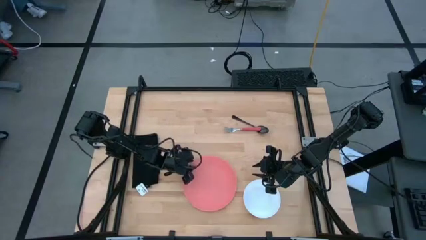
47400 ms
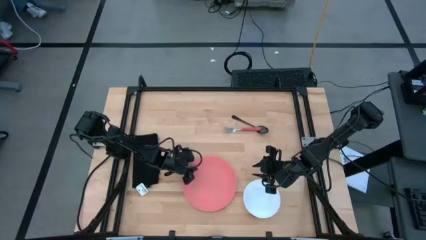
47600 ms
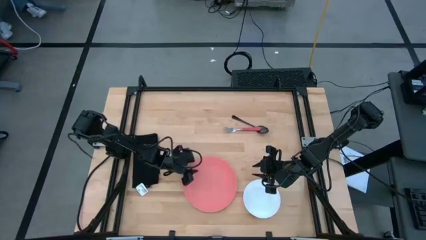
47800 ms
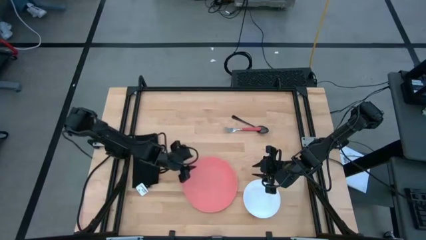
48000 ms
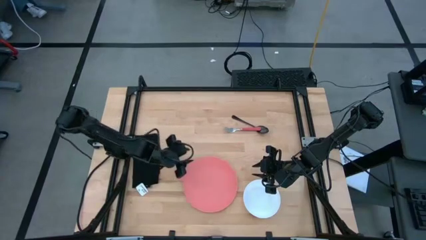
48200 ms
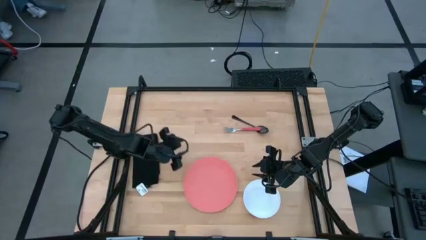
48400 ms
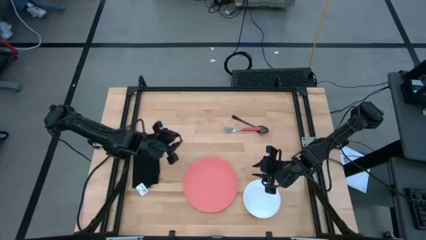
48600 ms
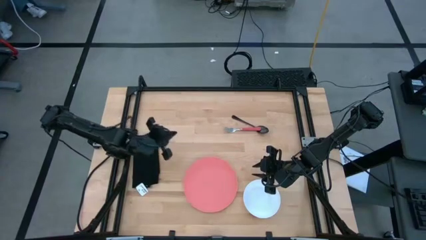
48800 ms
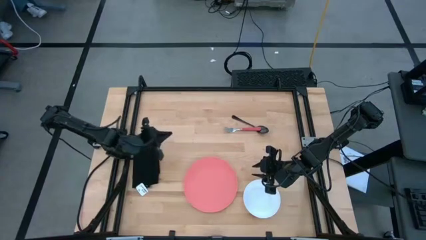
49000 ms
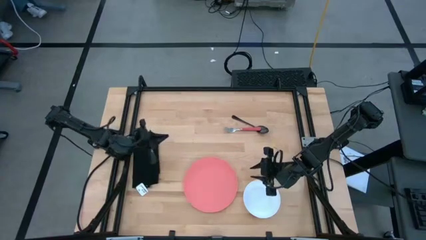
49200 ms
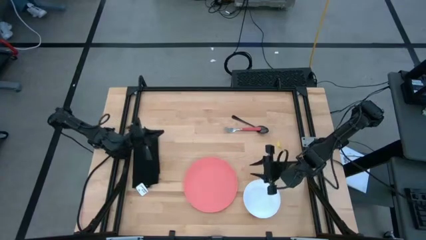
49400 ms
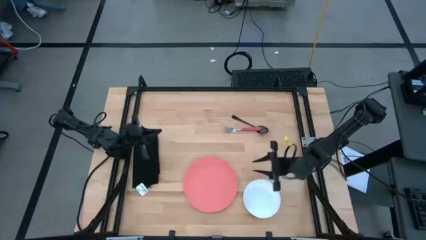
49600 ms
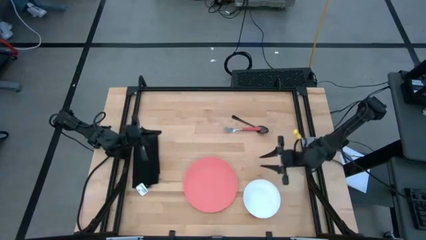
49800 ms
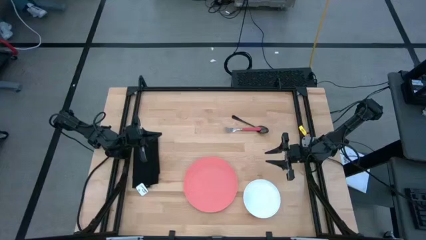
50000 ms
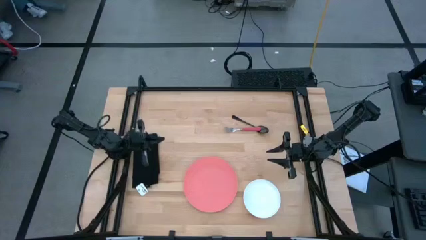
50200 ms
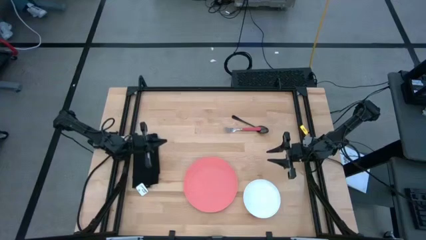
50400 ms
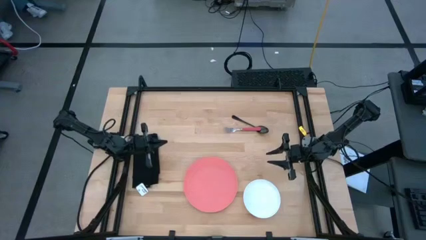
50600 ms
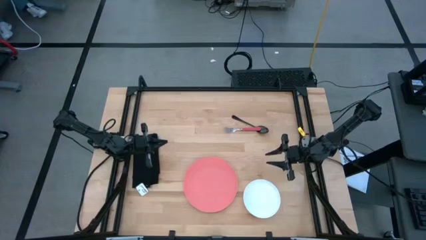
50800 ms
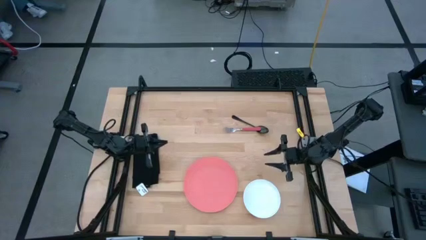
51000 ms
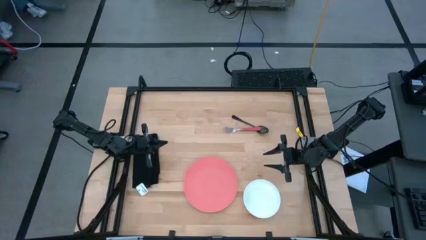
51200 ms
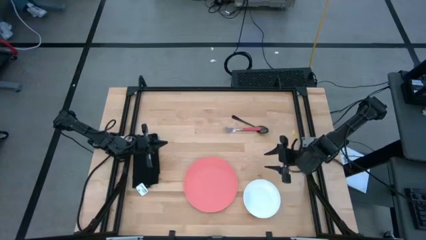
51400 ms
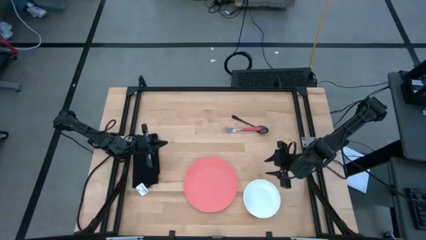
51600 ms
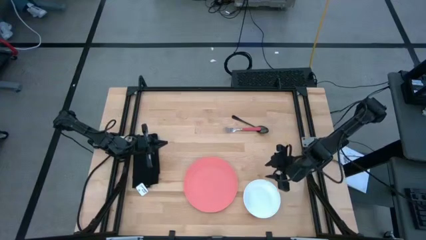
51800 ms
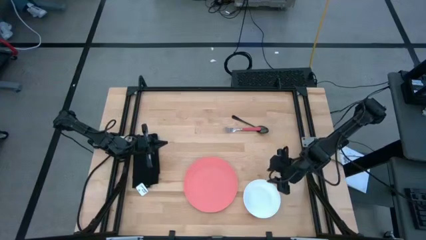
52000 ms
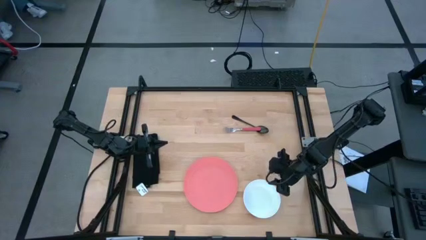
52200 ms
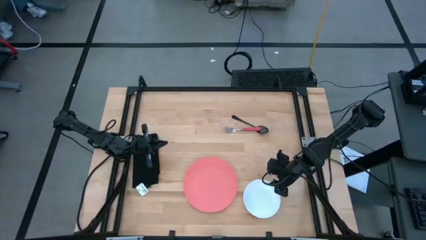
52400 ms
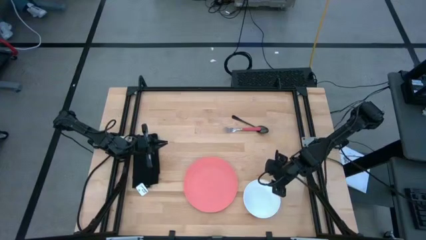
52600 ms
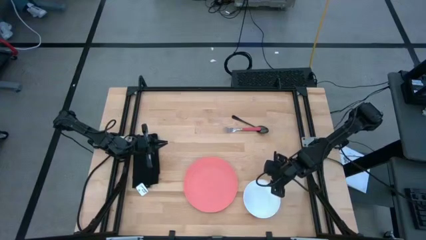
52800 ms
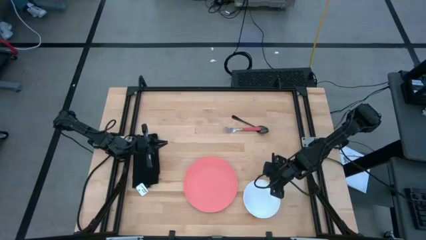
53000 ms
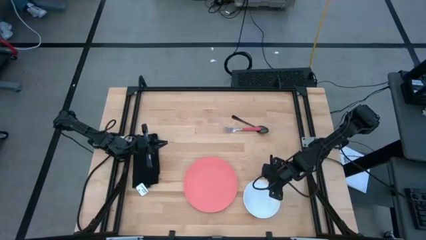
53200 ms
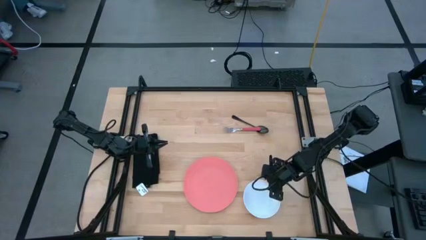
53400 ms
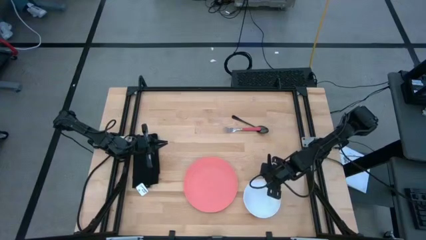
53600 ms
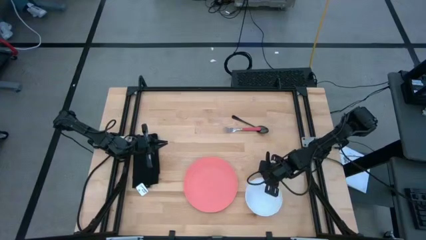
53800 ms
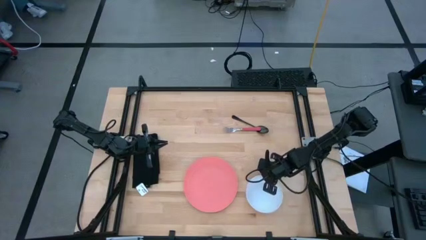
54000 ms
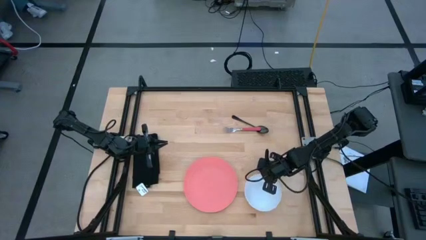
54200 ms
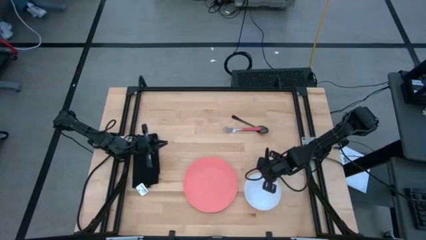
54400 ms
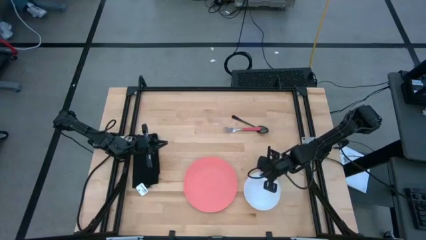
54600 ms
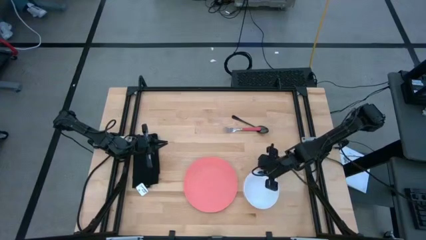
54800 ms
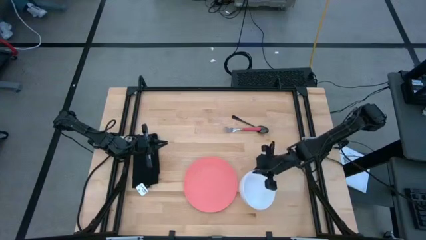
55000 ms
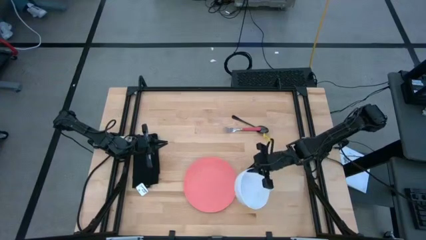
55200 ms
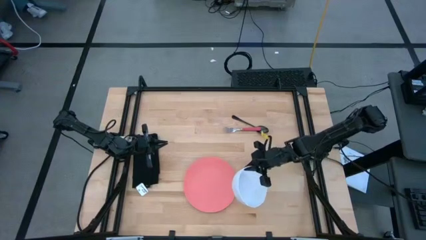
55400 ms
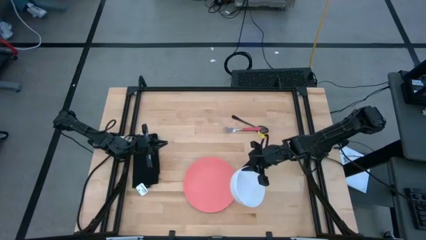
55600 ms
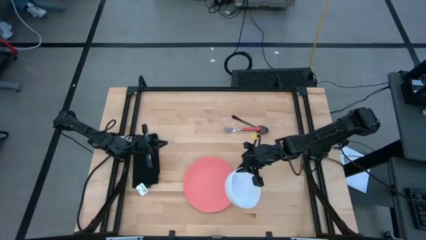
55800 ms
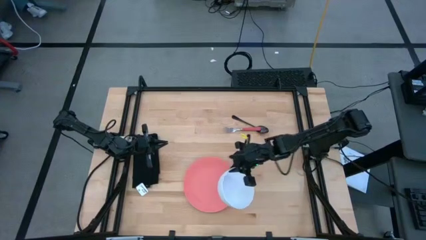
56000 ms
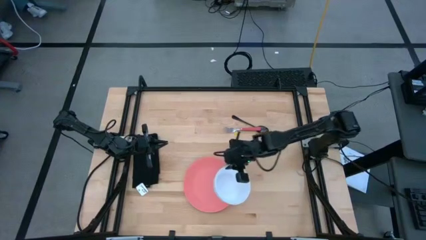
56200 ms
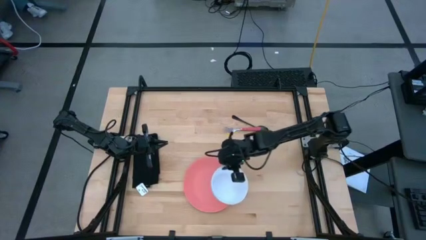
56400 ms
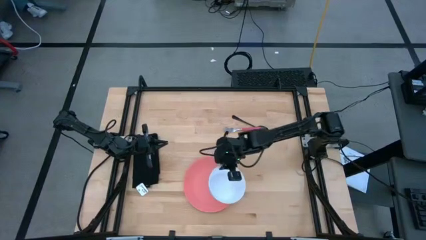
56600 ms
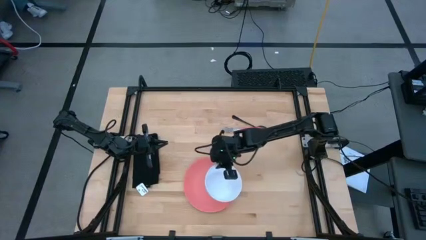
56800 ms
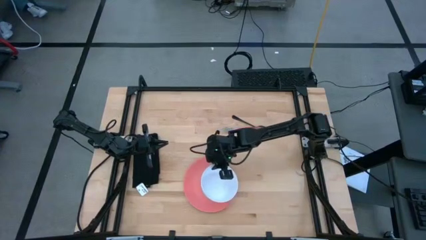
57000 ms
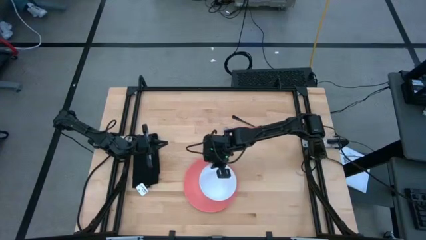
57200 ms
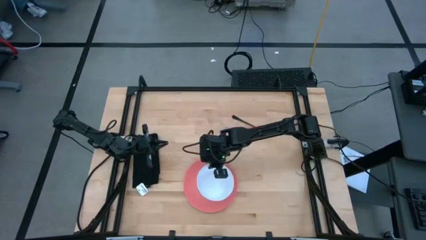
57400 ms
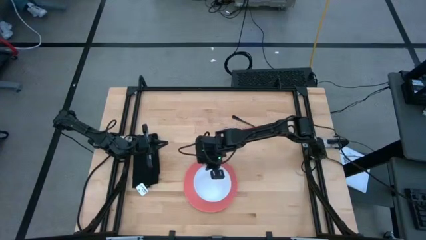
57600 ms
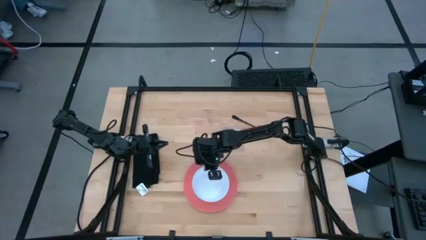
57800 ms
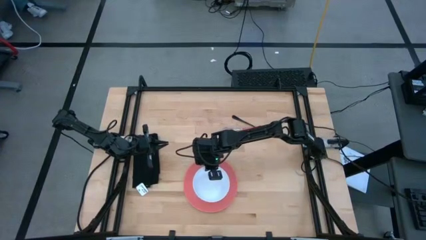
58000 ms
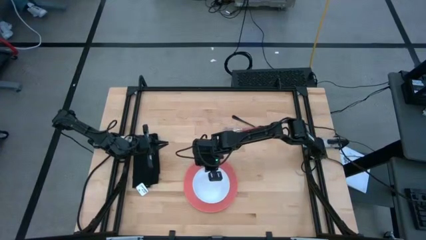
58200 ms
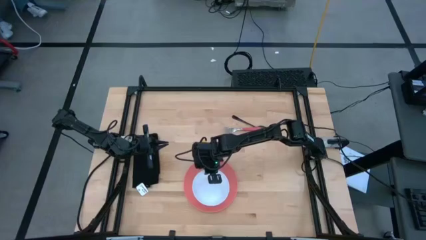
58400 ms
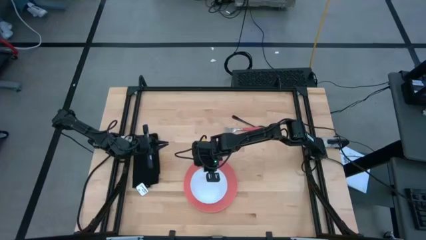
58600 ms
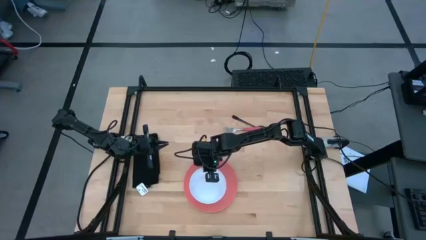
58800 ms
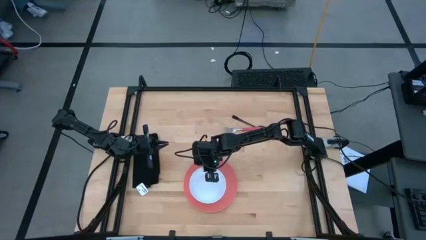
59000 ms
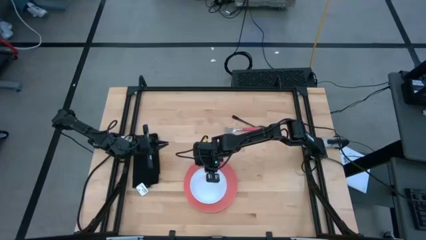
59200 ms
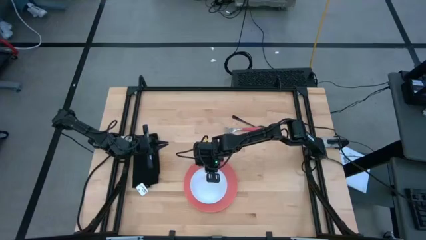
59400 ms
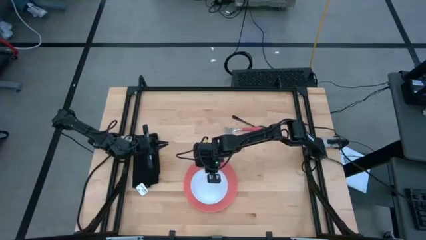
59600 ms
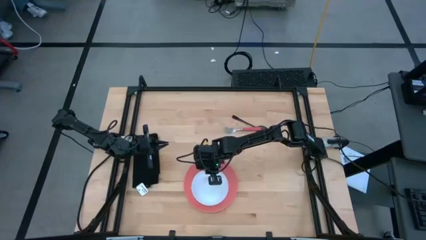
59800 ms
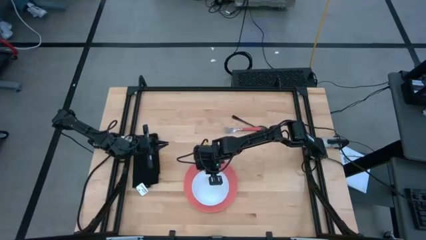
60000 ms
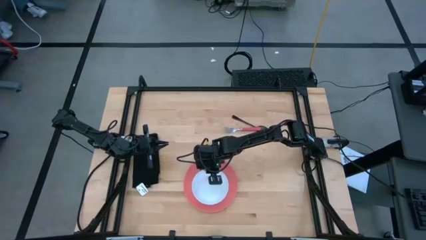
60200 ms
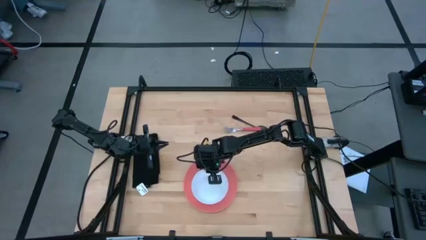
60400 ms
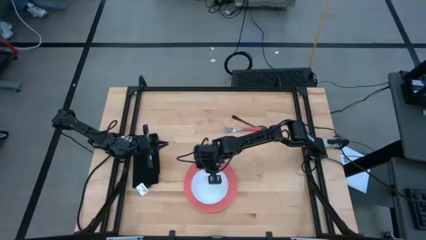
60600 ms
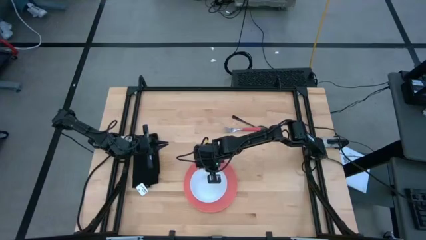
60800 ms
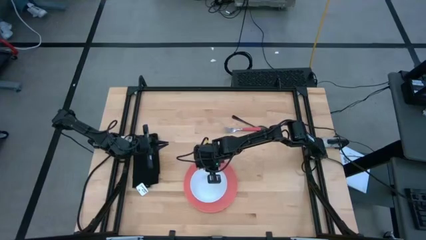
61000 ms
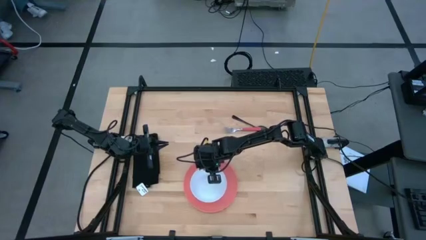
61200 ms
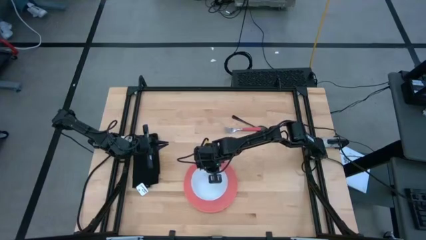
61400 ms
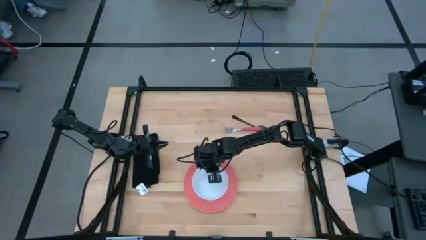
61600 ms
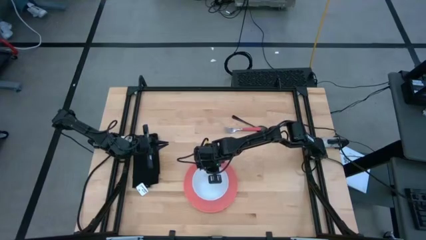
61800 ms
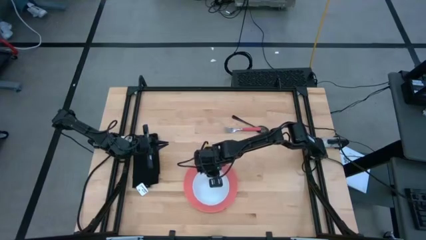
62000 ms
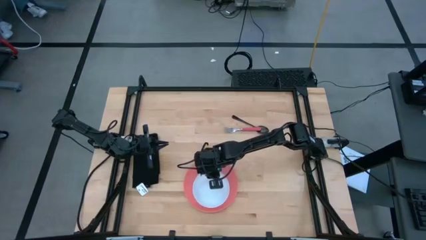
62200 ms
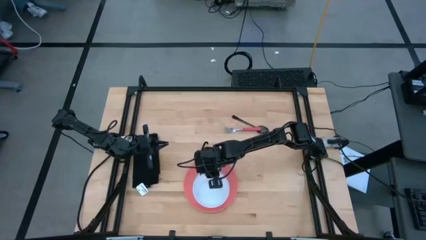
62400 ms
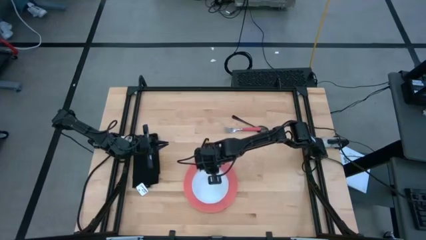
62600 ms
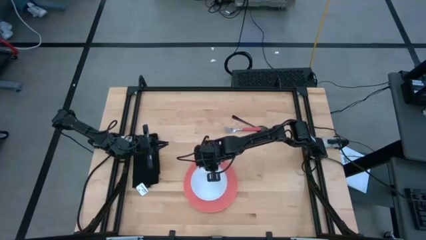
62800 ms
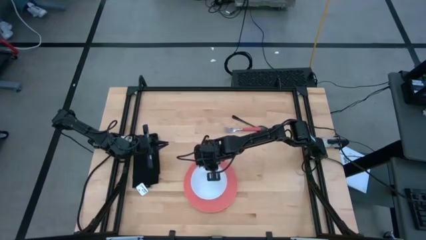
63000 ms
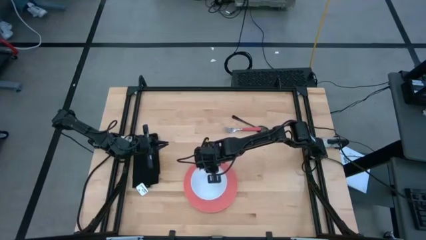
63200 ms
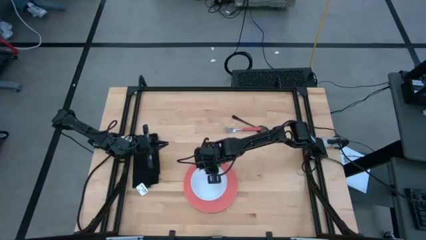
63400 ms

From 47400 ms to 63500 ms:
Task: Set table place
Put the white bowl on the pink plate
